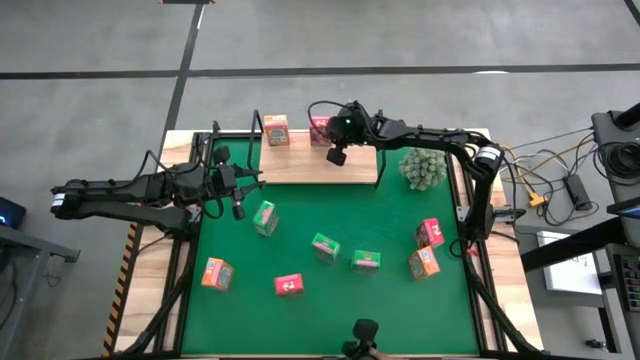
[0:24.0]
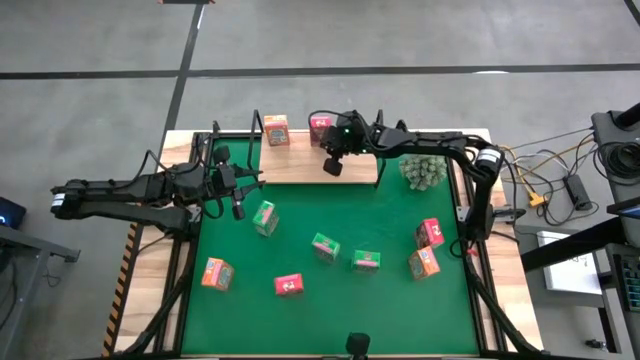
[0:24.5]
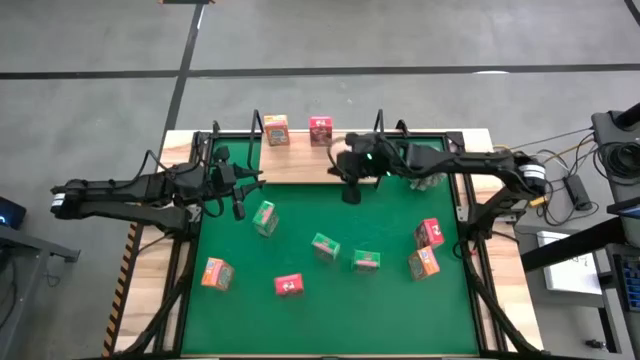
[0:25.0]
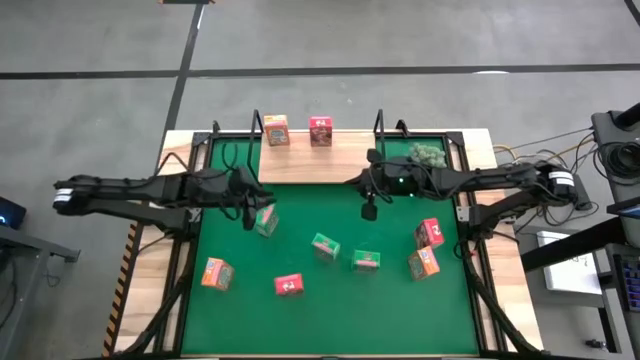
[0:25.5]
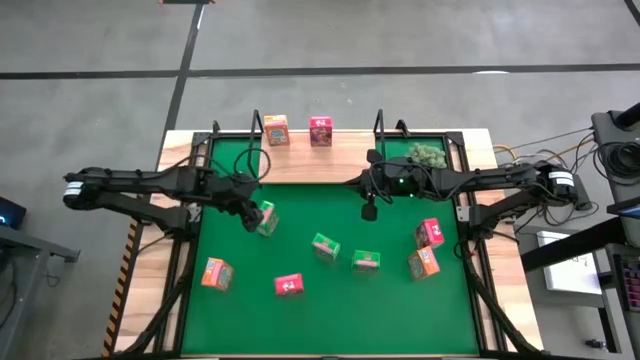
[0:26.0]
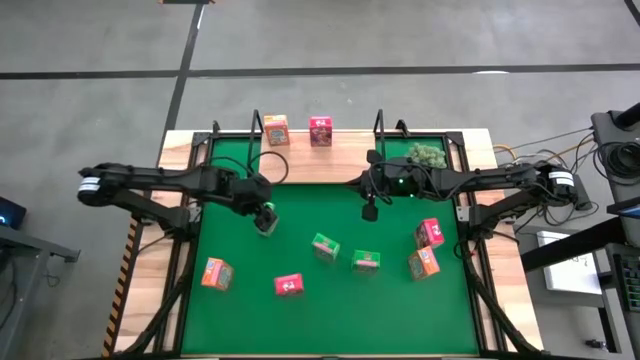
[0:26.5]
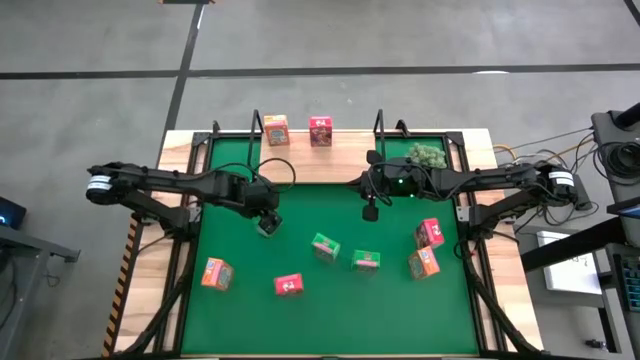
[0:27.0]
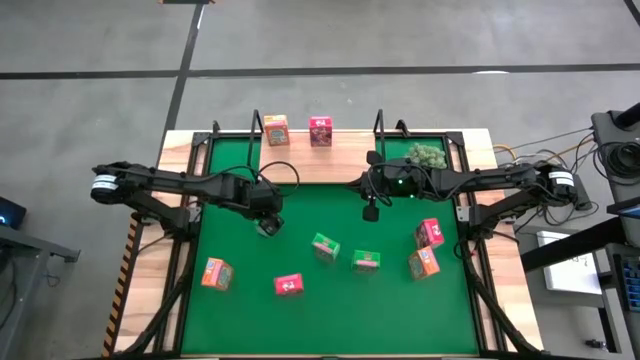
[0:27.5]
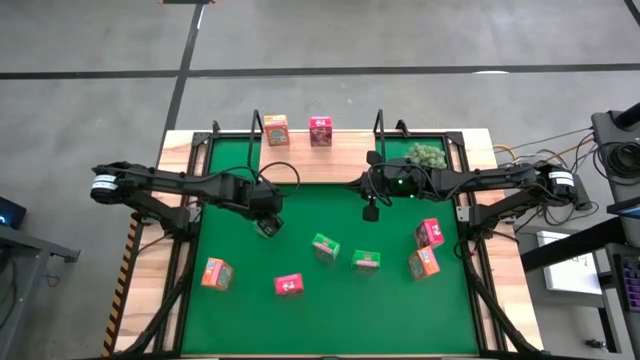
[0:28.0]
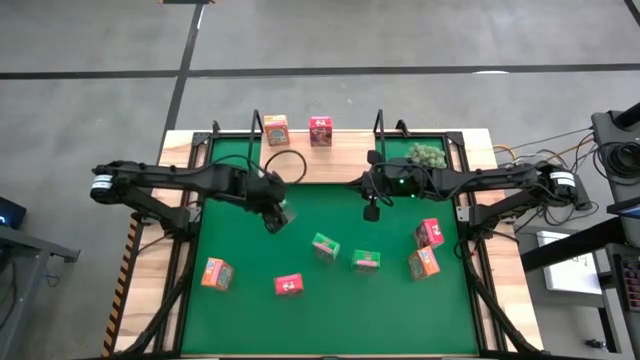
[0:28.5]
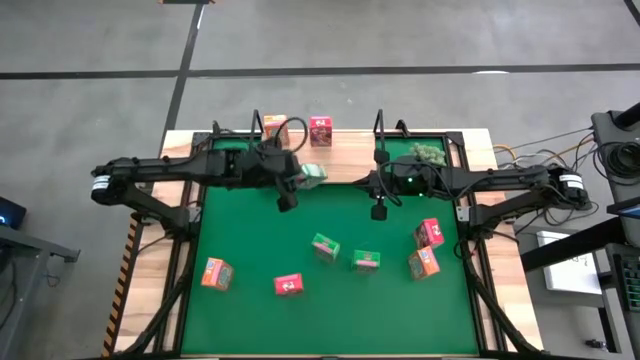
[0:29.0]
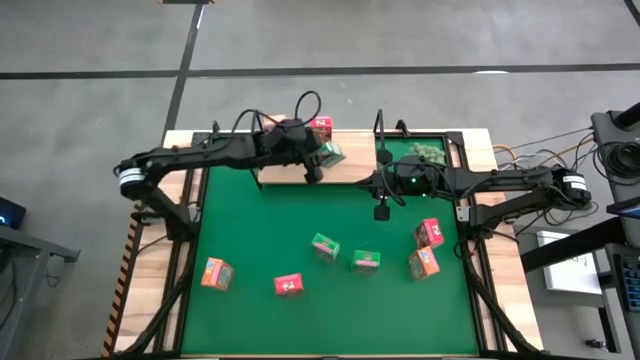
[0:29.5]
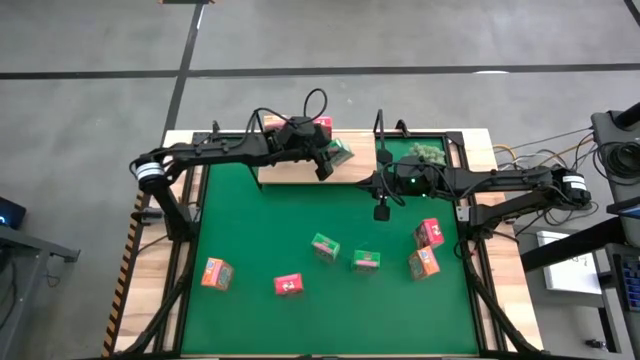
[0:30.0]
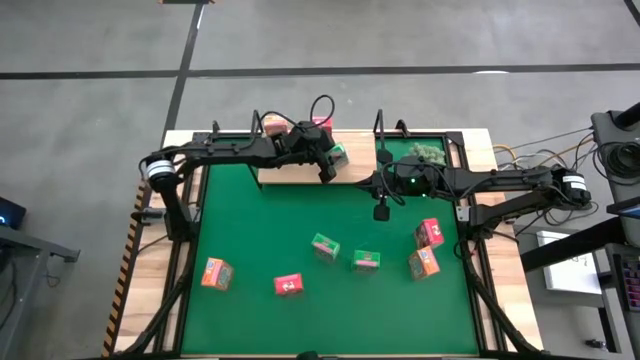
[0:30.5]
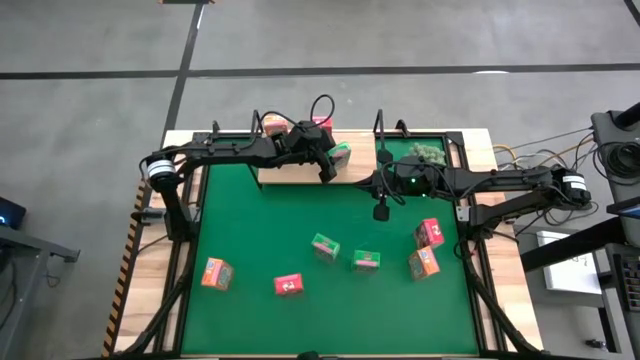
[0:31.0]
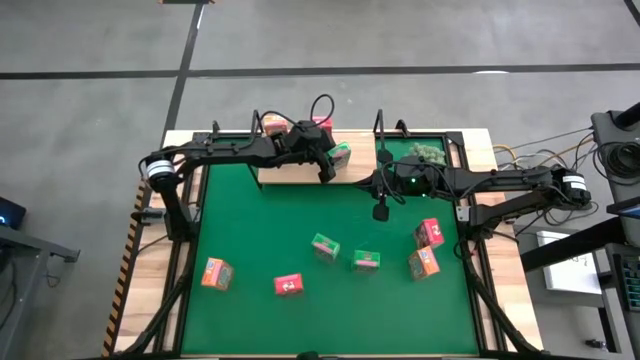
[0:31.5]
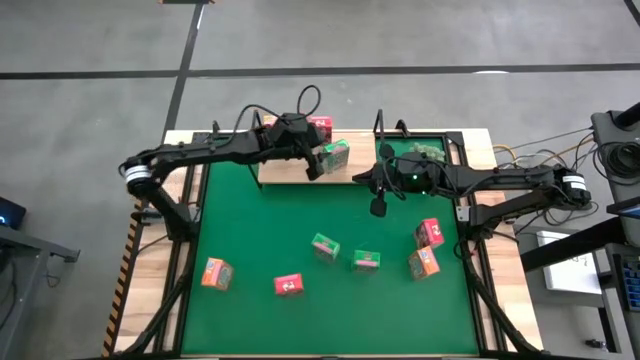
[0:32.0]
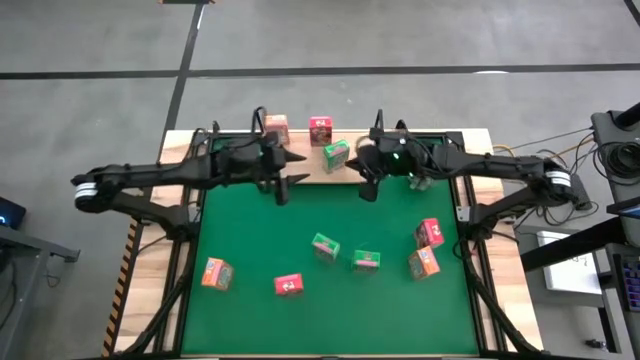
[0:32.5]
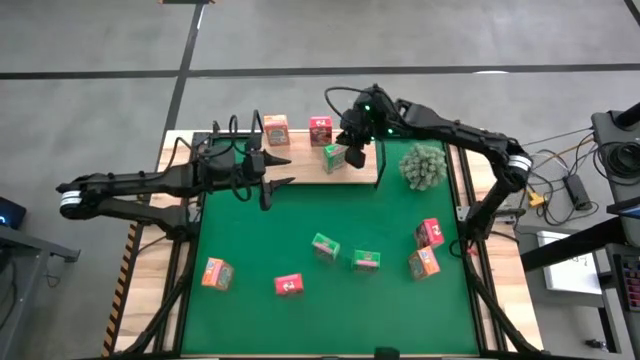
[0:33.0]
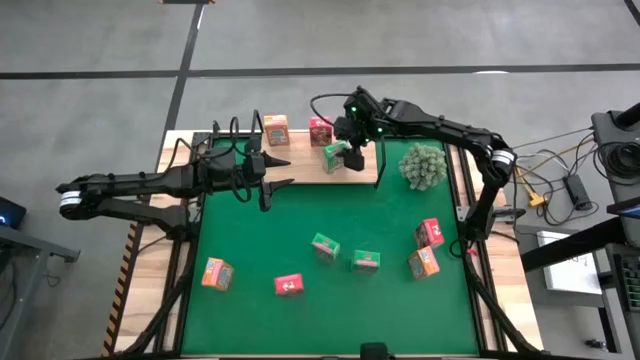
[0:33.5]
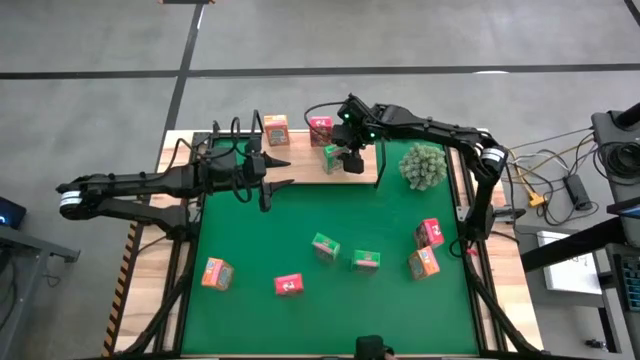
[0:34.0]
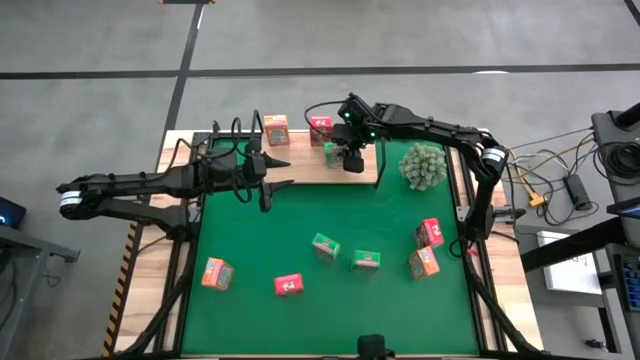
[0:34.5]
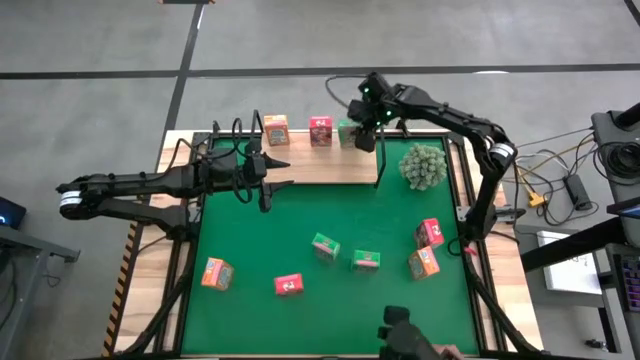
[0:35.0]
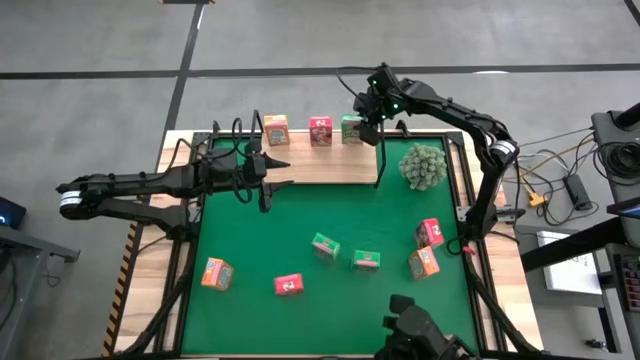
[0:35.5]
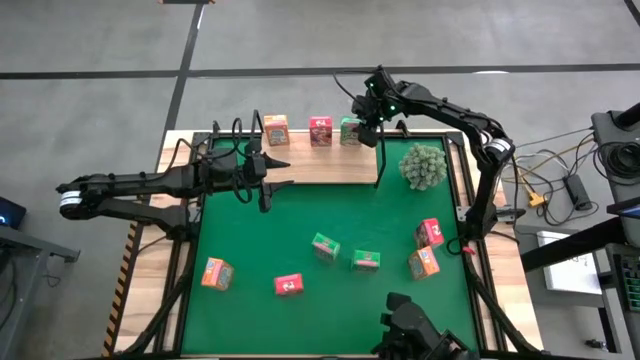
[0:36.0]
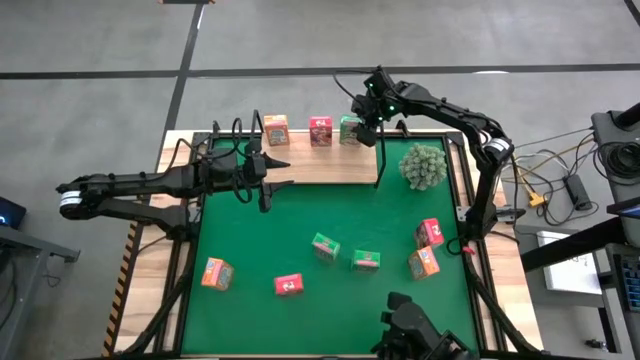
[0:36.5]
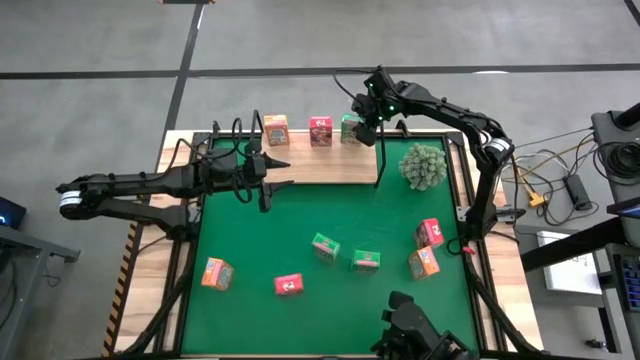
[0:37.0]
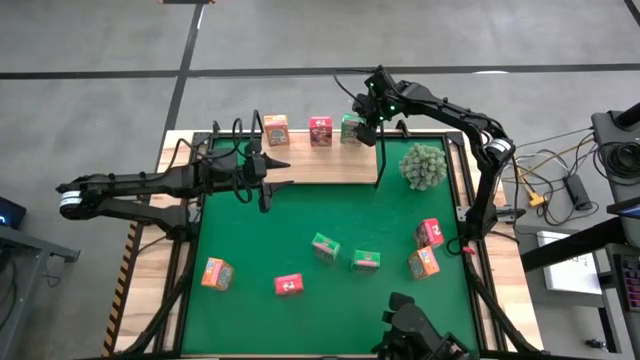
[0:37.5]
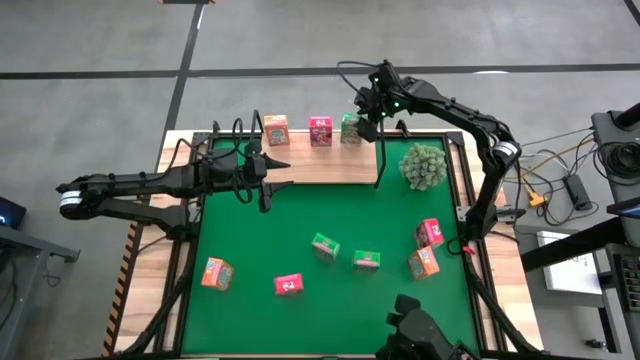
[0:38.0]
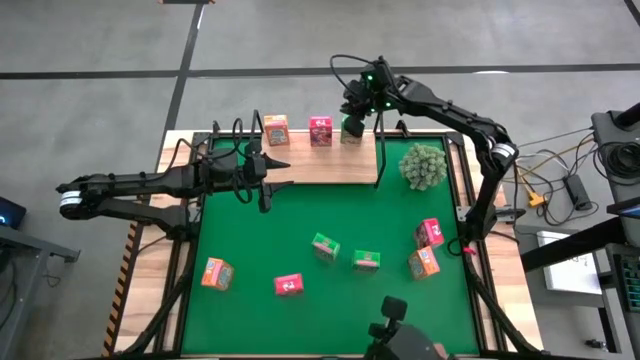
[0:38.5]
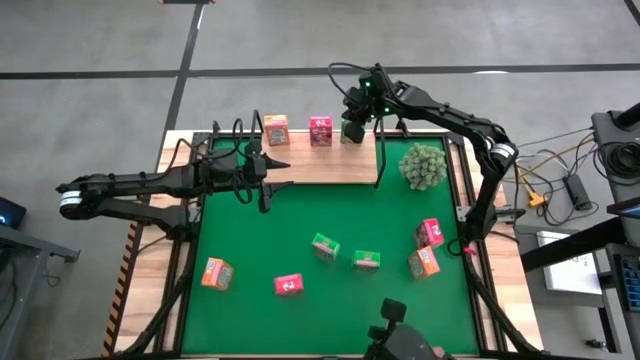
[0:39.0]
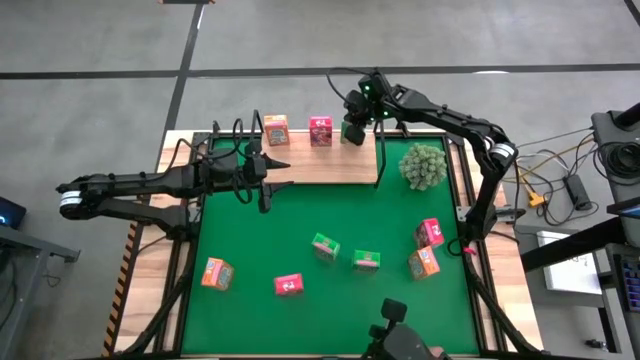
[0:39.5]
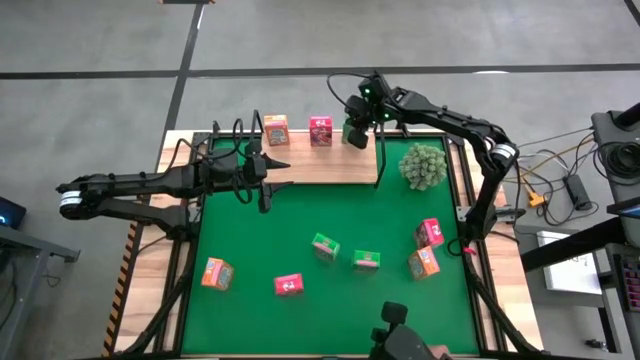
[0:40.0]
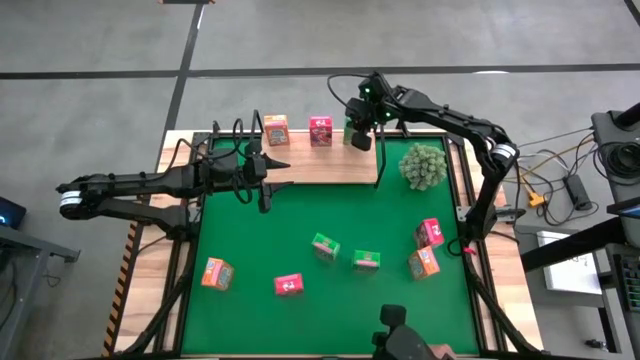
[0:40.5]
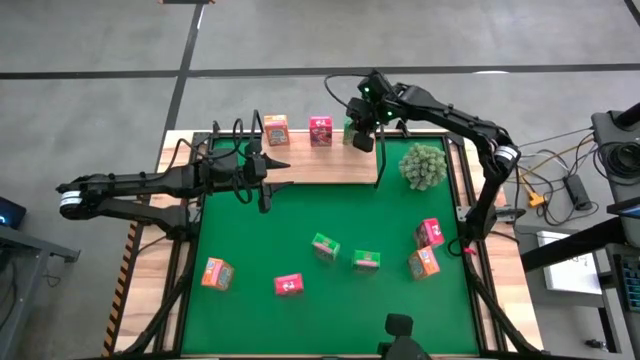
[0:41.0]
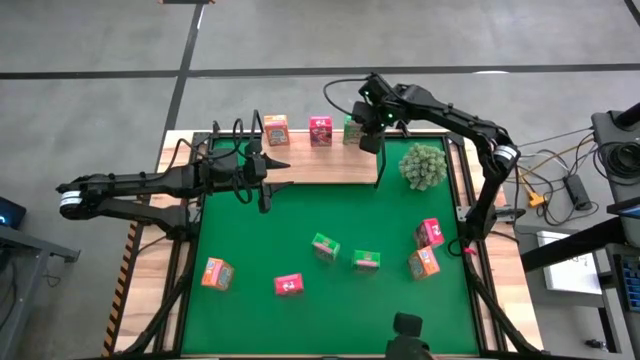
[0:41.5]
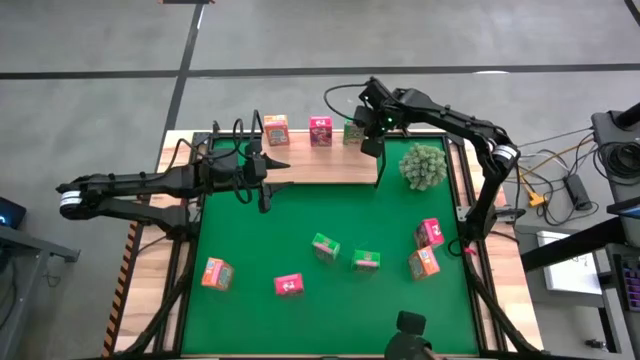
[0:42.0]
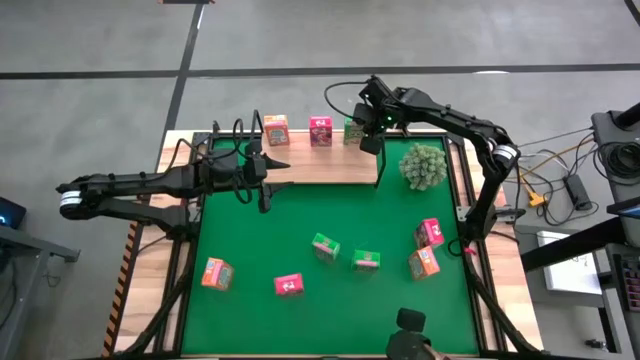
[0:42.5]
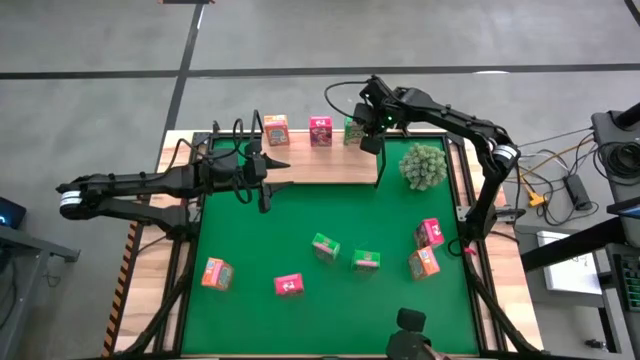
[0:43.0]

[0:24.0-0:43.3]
Task: Stack cereal on shelf
Put the top green cereal box on the shelf

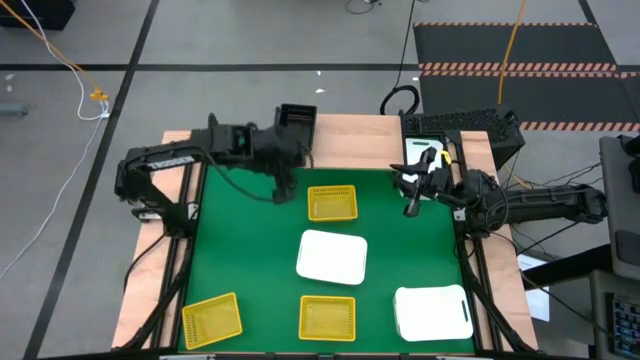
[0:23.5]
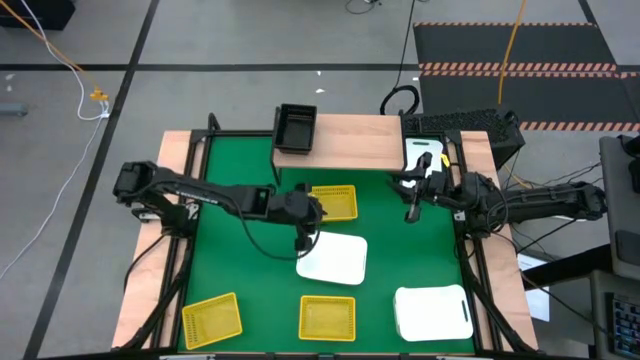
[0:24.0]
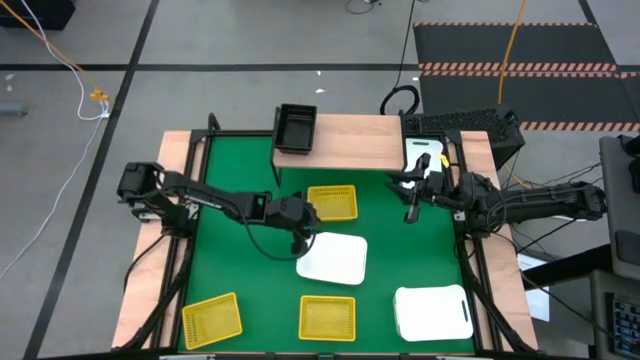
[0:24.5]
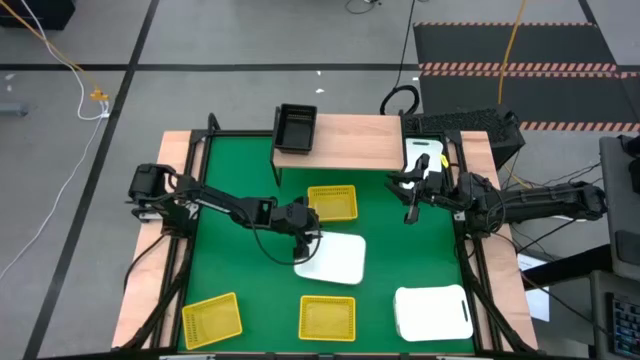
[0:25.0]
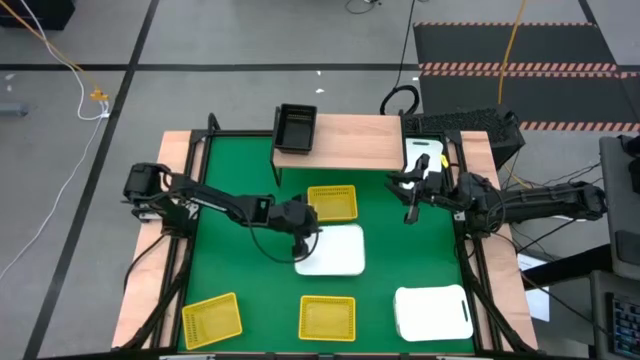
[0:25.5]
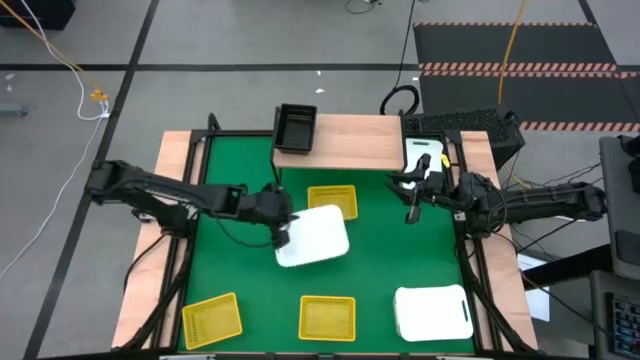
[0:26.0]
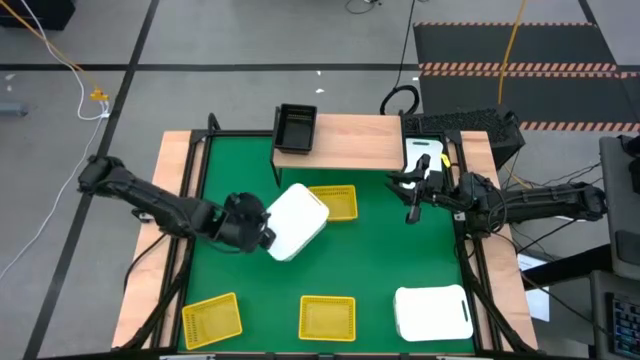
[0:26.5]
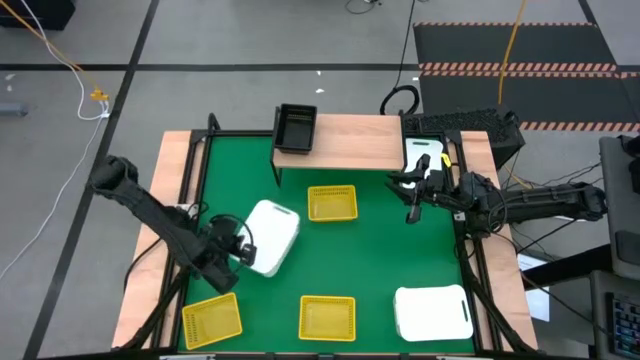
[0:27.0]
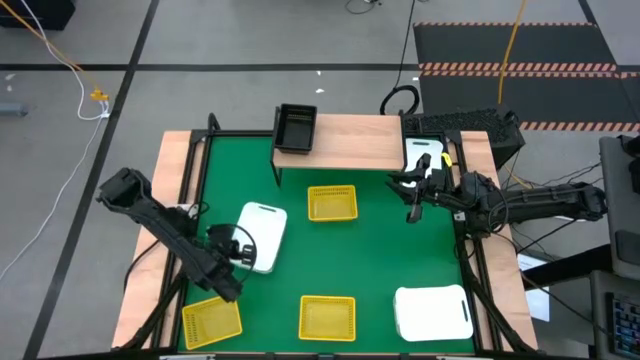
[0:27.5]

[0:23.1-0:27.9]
Task: Stack baskets on shelf by color
Move the middle white bin to the middle left of the table
